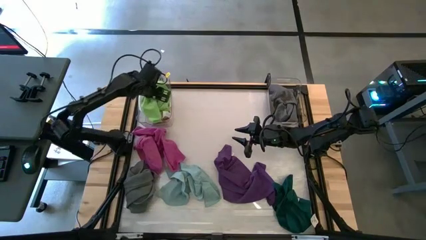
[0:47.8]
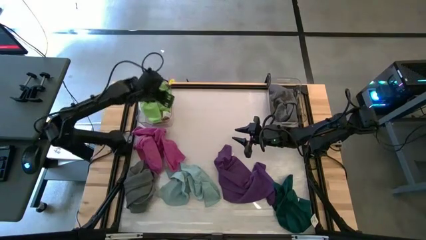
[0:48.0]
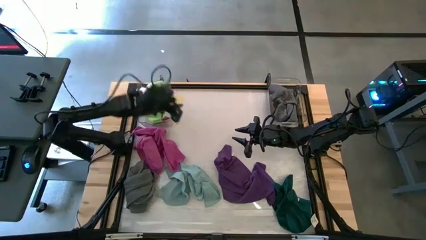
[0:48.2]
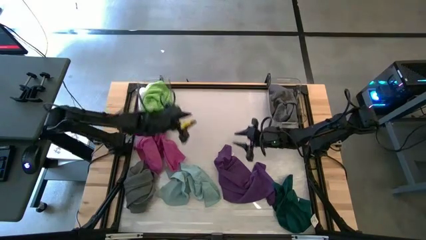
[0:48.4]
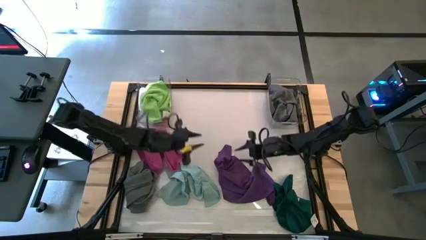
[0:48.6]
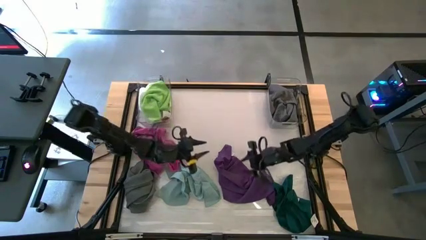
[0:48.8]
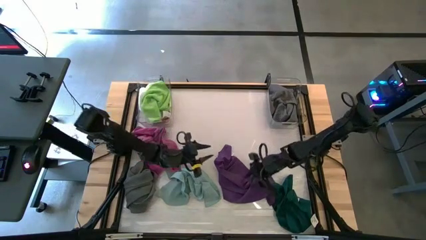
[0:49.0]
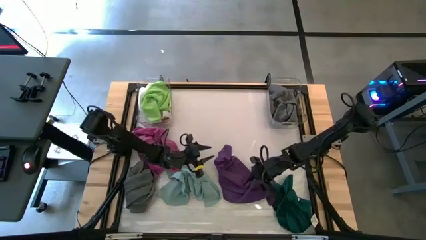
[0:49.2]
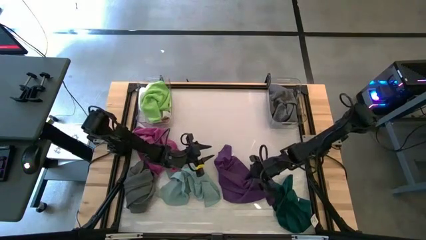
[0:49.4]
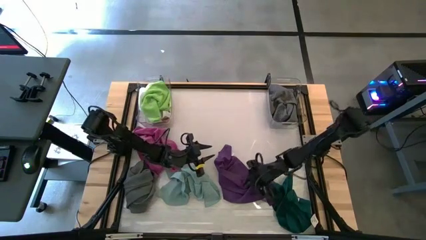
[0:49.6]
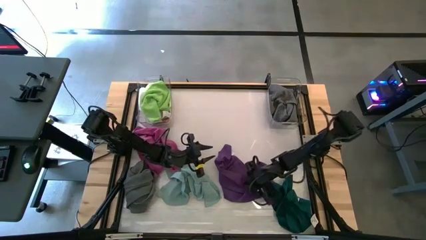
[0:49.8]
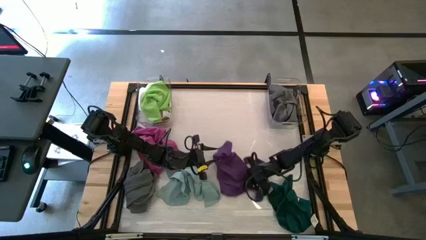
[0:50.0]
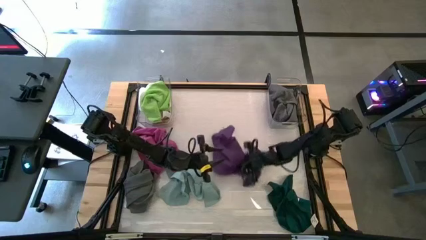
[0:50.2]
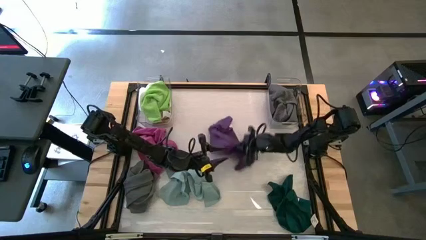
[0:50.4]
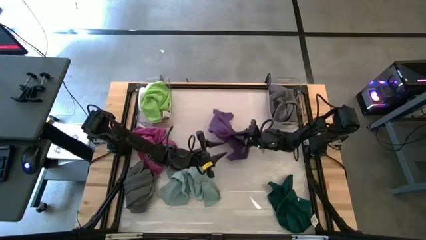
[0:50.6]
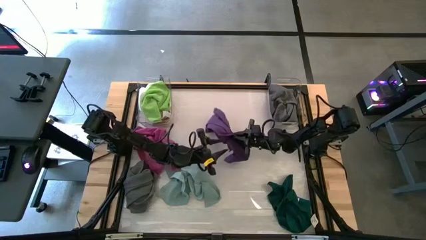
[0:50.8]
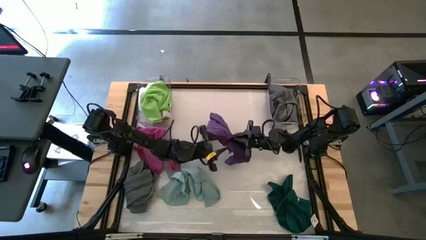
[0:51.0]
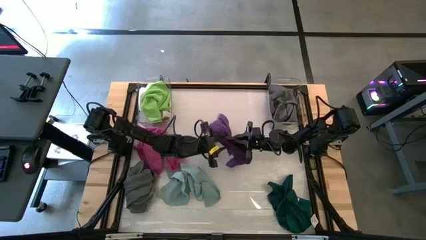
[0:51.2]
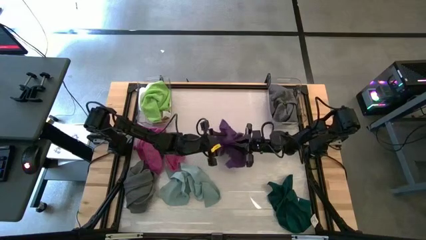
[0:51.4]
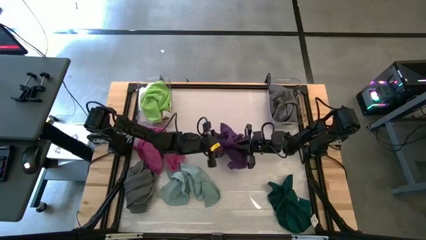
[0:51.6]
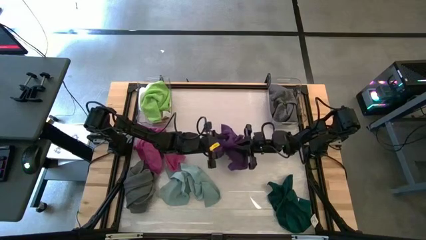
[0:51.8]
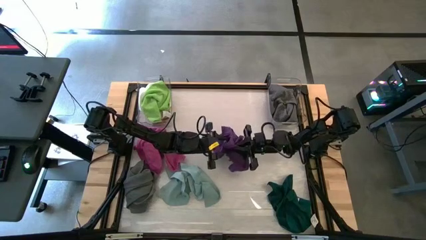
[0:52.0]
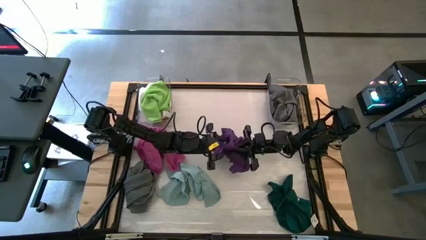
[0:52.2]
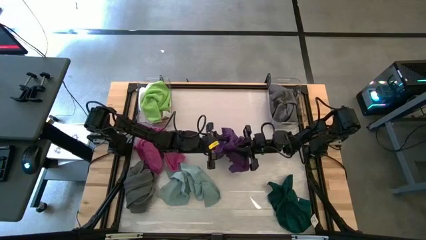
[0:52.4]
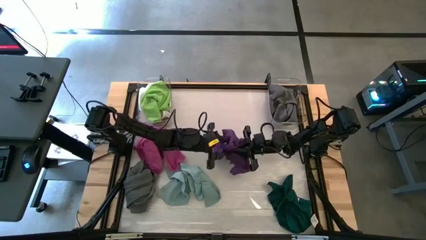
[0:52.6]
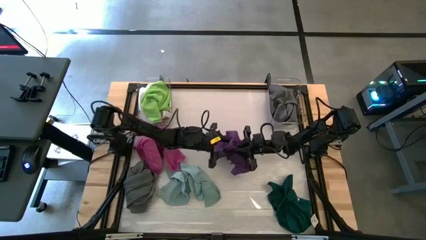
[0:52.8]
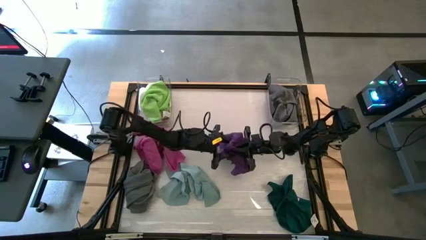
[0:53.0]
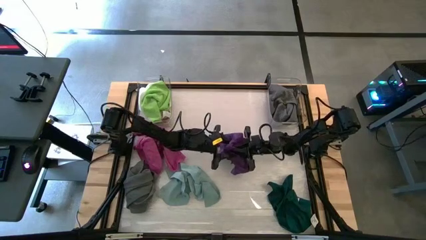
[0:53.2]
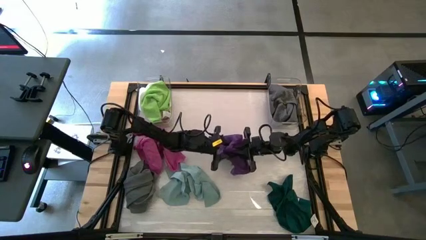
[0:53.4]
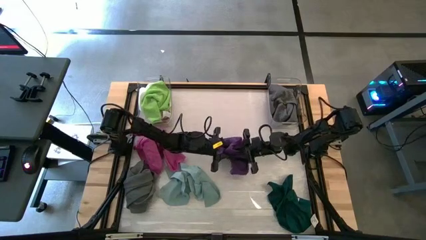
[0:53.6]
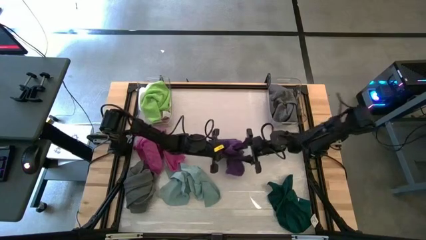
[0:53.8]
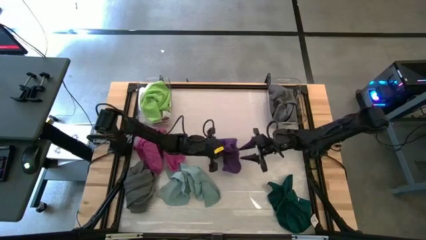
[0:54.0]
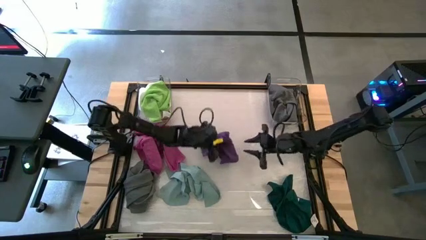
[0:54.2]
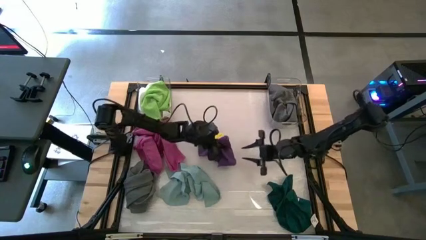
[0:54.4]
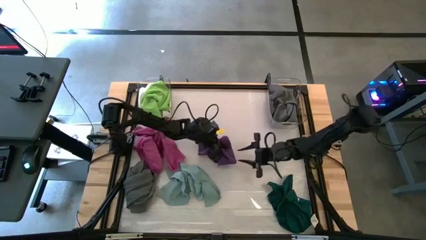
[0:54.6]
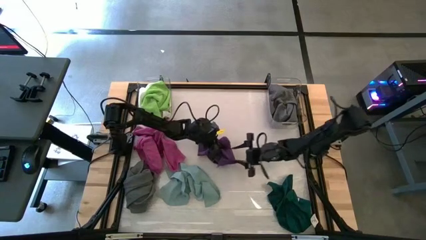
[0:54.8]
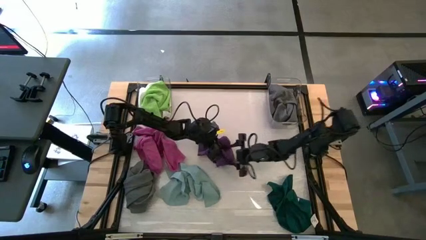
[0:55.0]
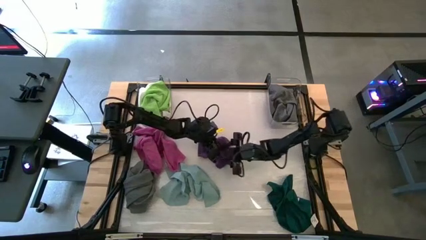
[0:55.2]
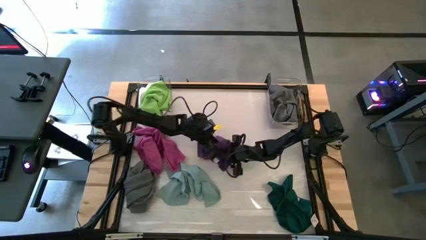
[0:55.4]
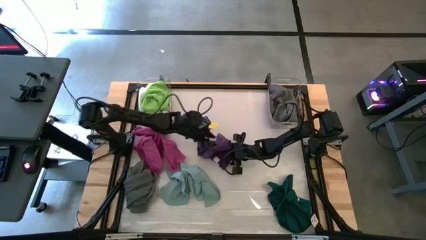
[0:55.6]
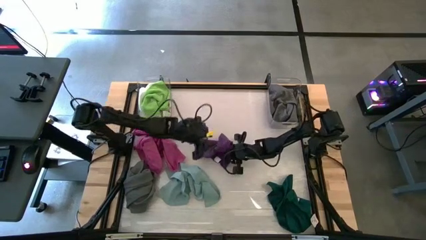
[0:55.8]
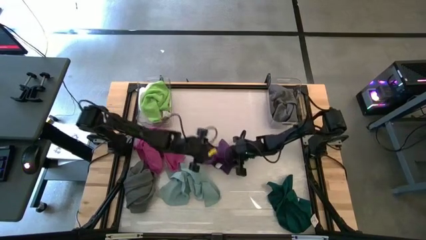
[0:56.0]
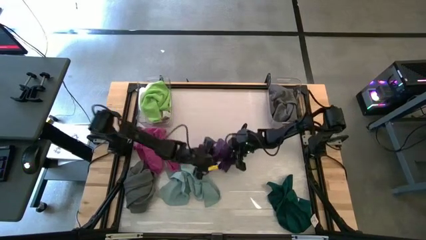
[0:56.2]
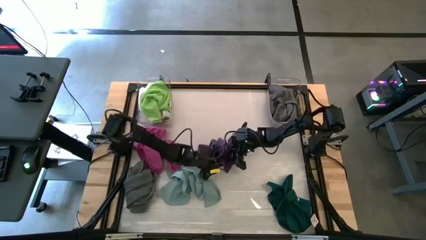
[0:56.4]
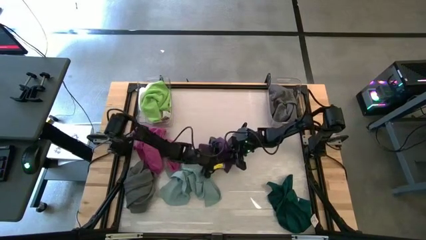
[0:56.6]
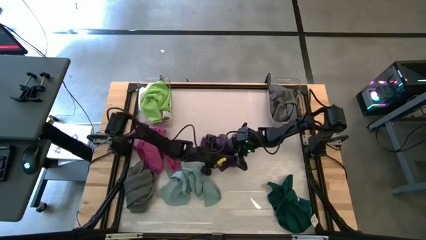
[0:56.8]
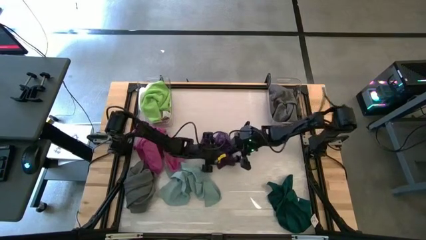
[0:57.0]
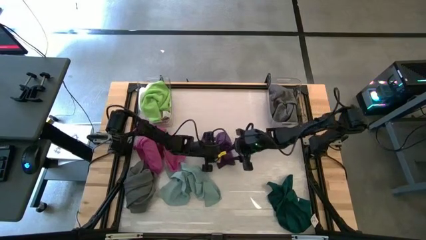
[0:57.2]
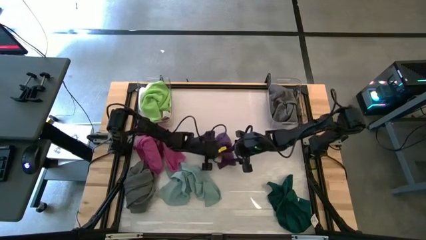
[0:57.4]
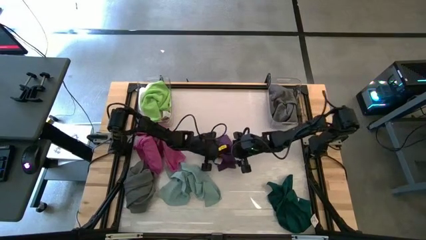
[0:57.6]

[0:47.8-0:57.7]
Task: Sort towels by color in basket
Put the violet towel into the right transparent bin
